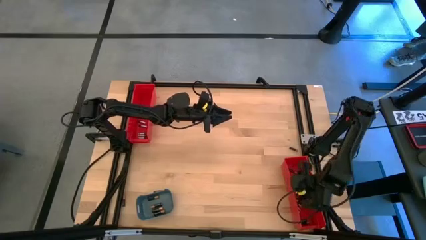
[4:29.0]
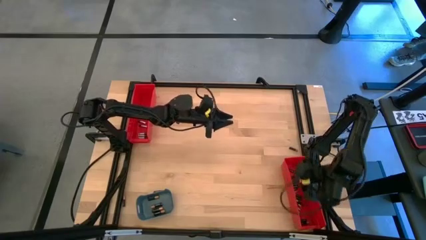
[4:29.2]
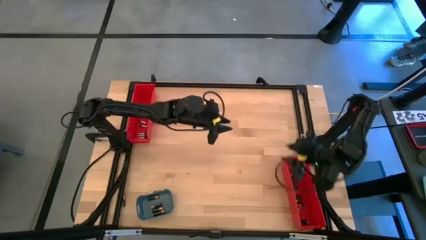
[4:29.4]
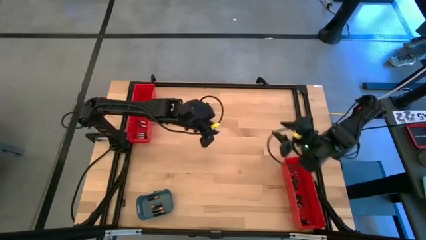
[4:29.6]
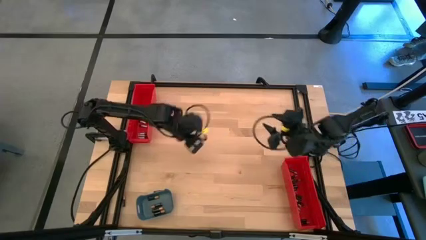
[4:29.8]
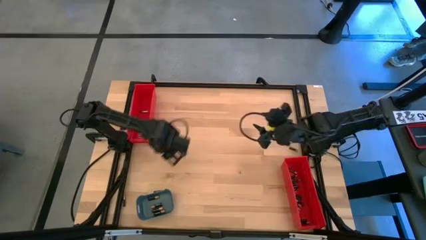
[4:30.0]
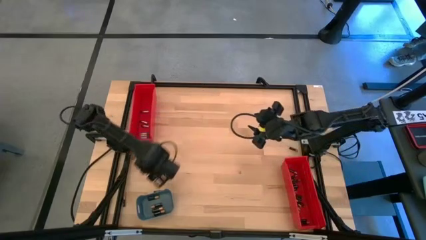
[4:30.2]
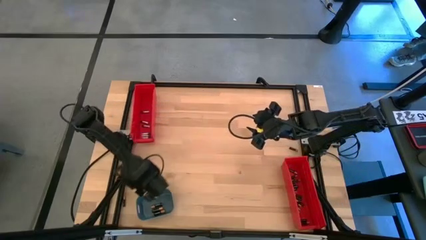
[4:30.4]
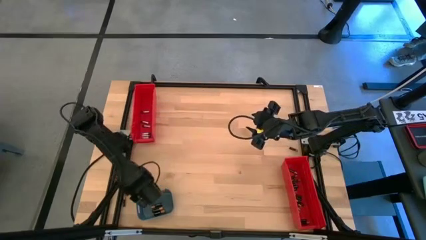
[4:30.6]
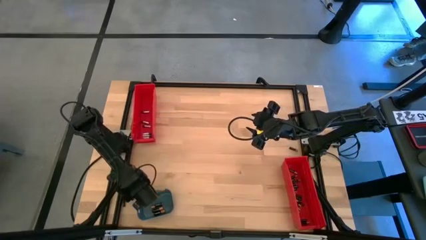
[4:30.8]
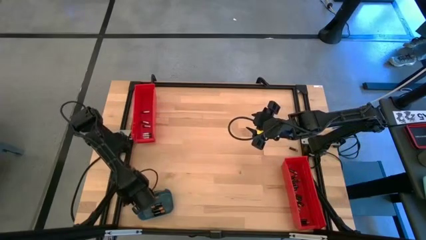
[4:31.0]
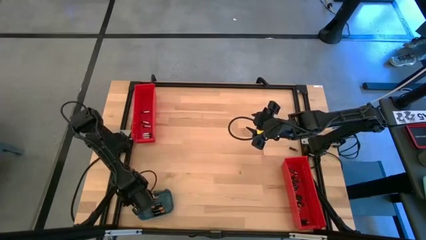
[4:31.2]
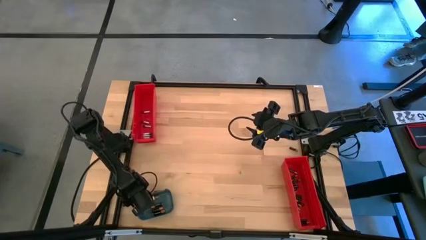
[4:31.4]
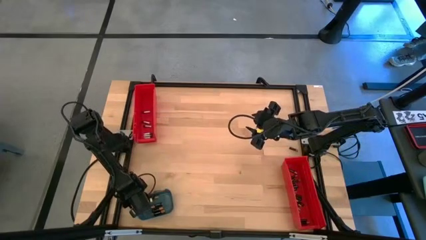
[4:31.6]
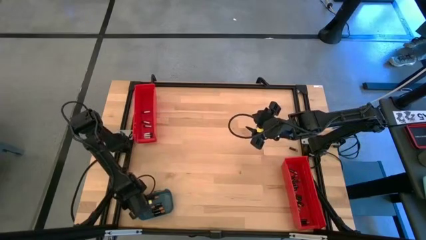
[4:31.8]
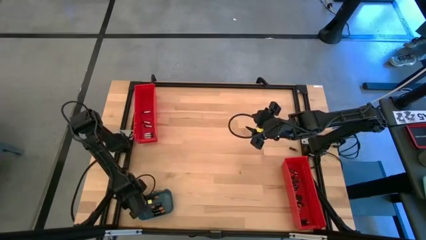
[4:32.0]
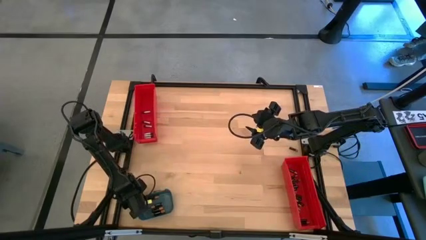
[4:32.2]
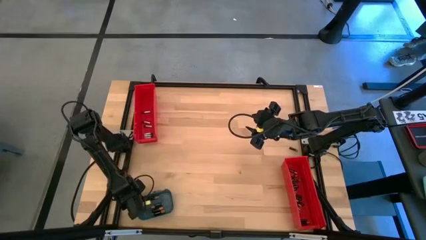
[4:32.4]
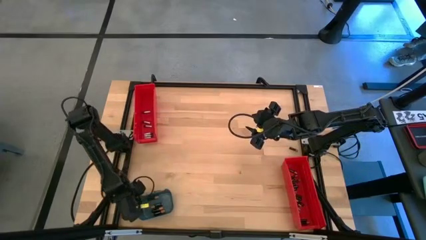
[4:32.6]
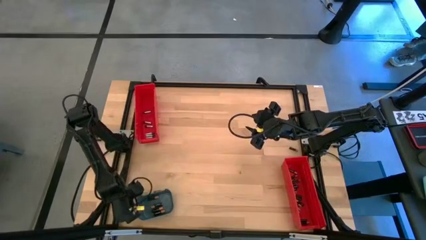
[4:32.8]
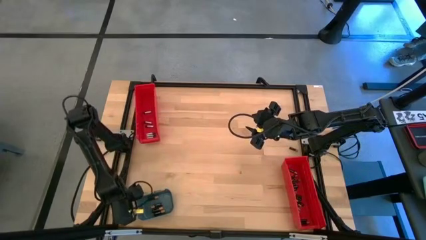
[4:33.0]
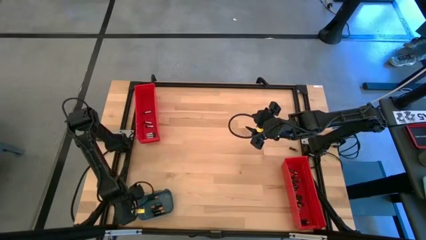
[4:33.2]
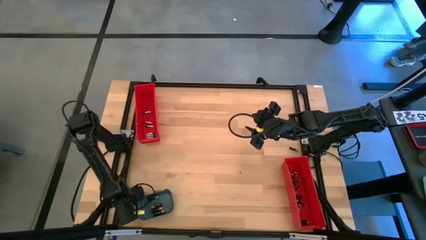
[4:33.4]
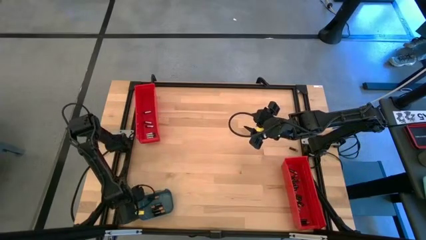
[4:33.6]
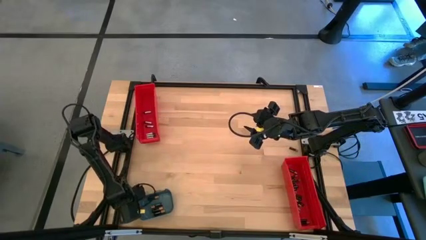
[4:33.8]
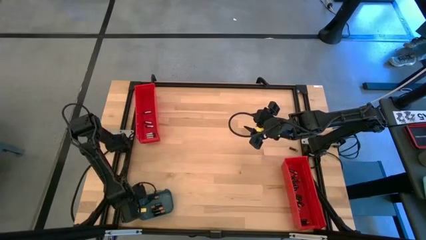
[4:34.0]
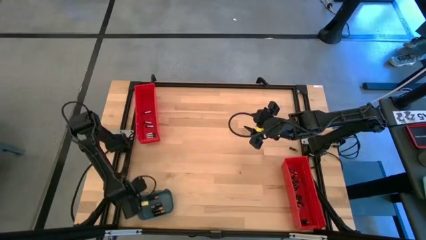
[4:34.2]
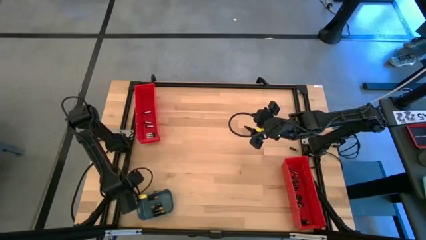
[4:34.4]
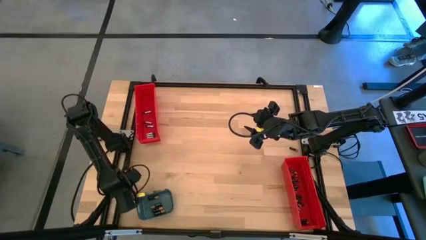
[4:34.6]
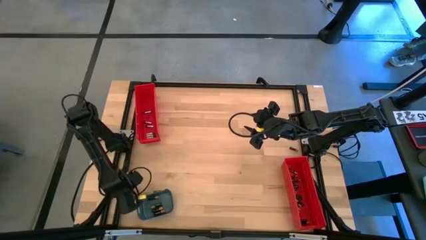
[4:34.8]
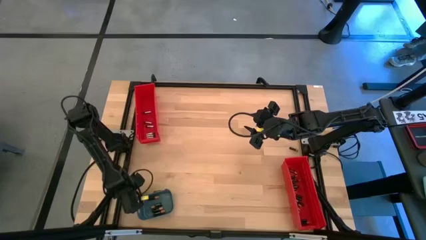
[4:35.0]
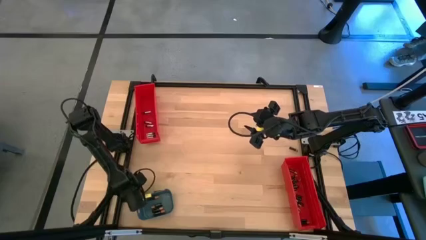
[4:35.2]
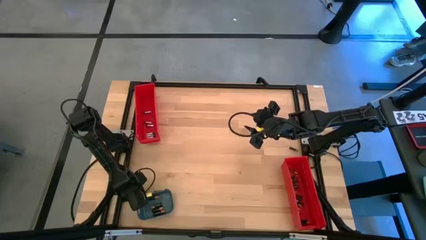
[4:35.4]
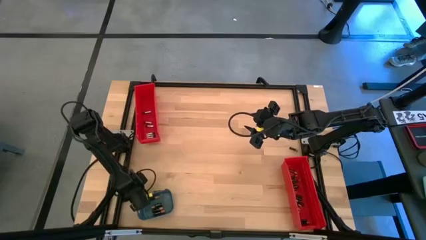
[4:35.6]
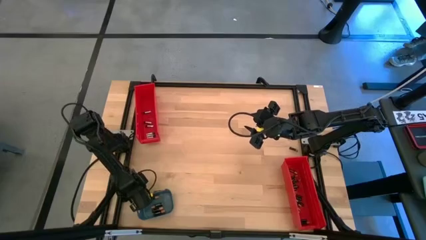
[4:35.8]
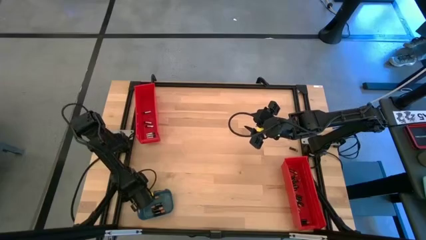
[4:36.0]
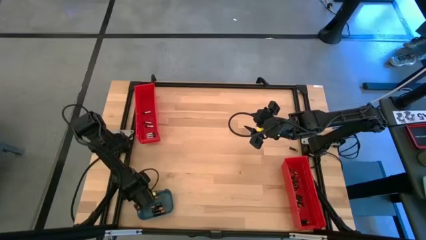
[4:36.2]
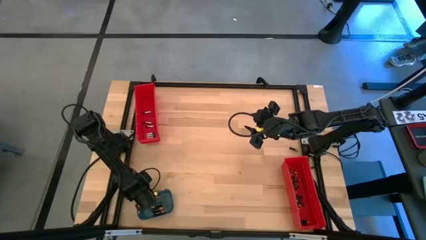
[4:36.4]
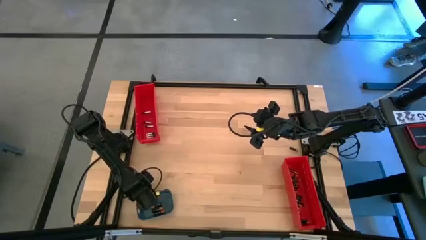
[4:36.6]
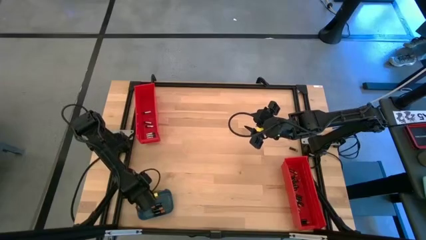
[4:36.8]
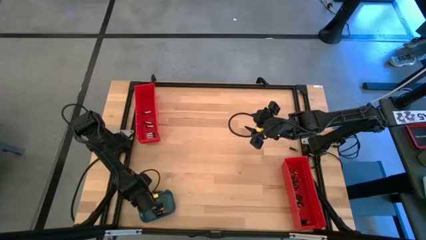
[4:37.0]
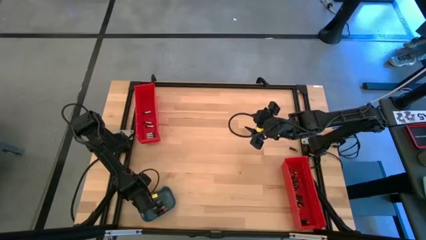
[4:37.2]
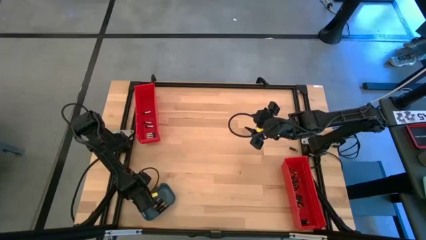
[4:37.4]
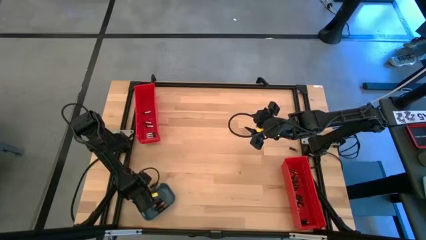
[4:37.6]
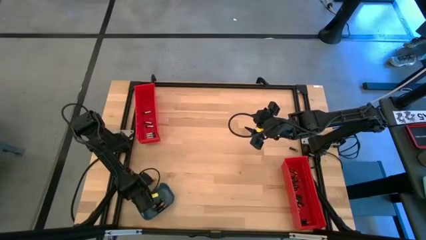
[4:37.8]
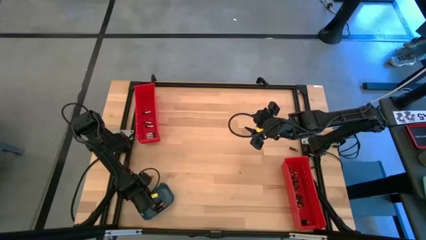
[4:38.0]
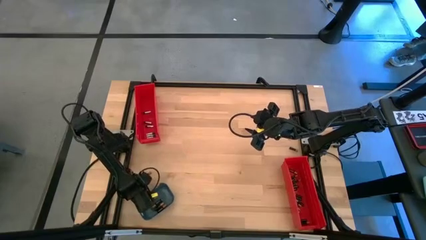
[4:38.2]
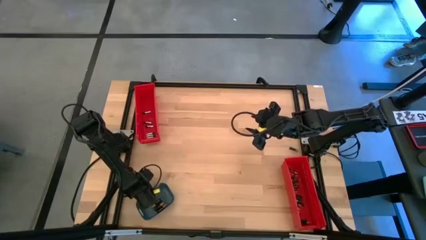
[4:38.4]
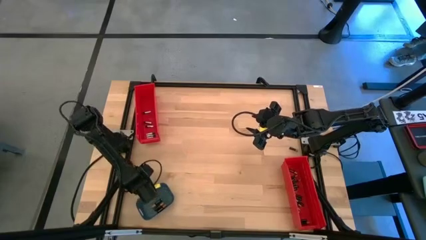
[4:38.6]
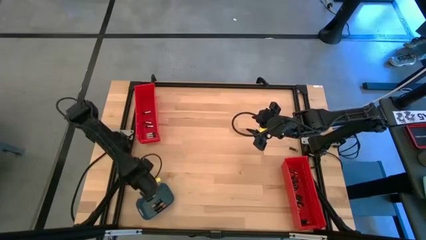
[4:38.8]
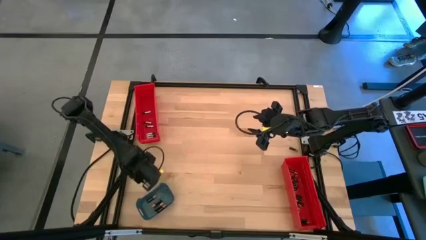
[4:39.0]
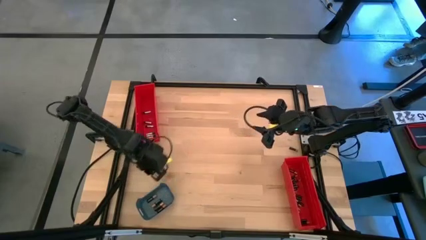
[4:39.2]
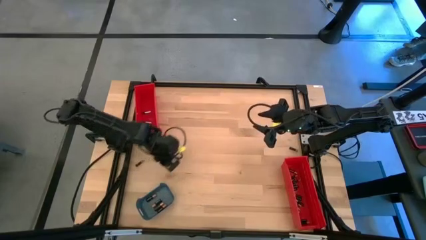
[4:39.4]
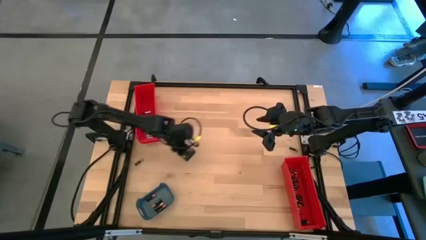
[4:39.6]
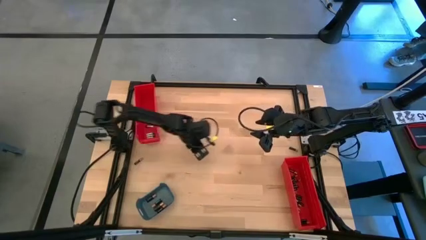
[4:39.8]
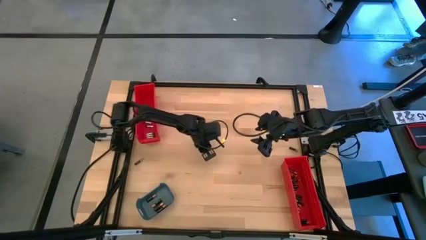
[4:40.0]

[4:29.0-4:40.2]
Task: Sort batteries
Put the small black battery into the bottom red bin
